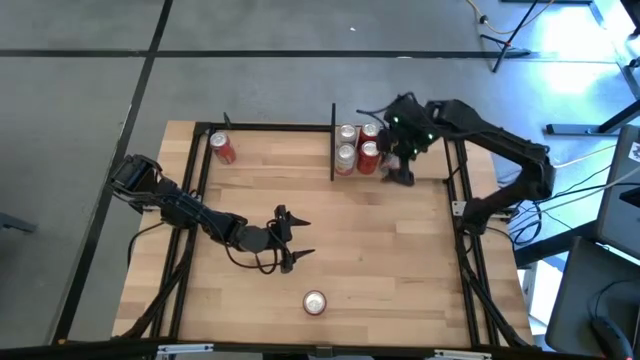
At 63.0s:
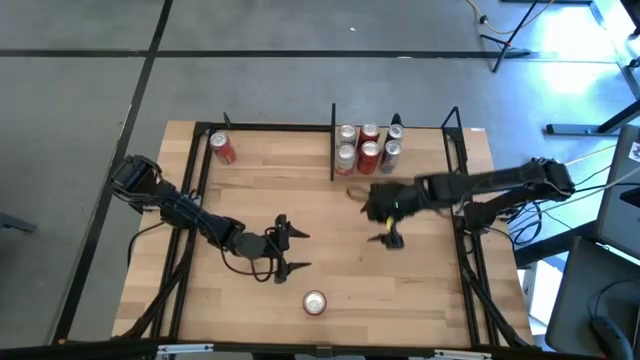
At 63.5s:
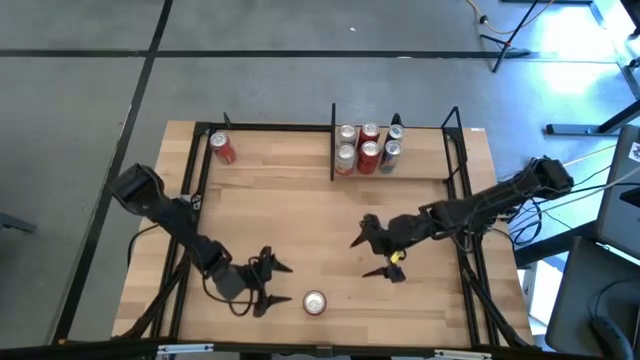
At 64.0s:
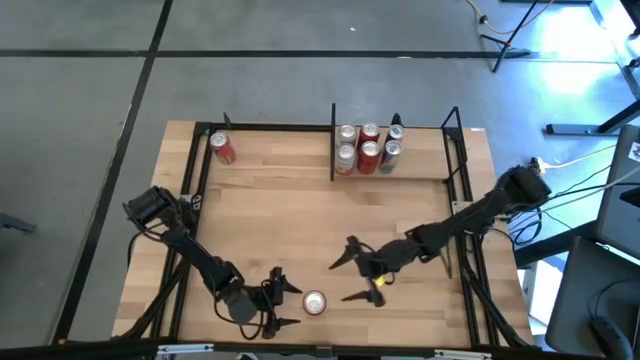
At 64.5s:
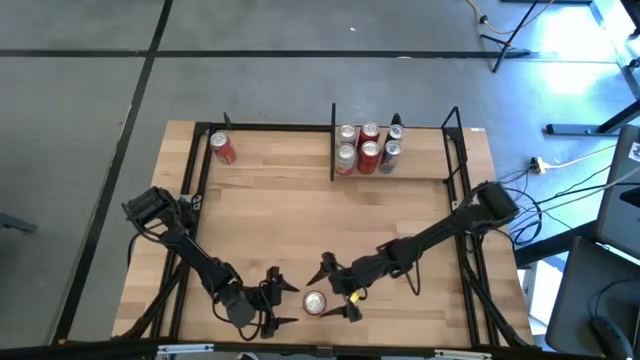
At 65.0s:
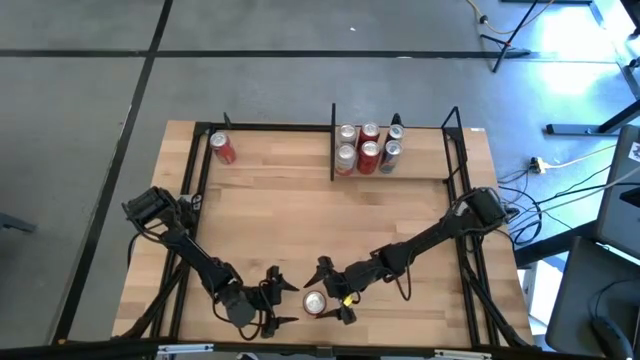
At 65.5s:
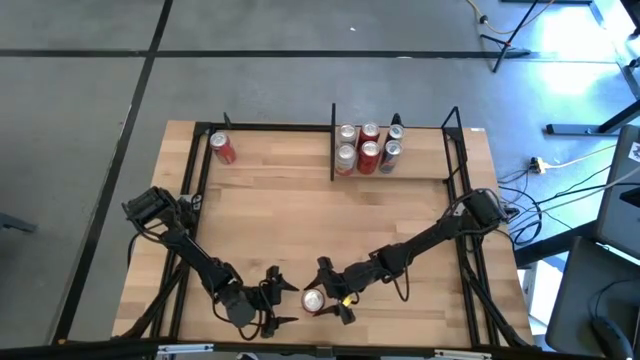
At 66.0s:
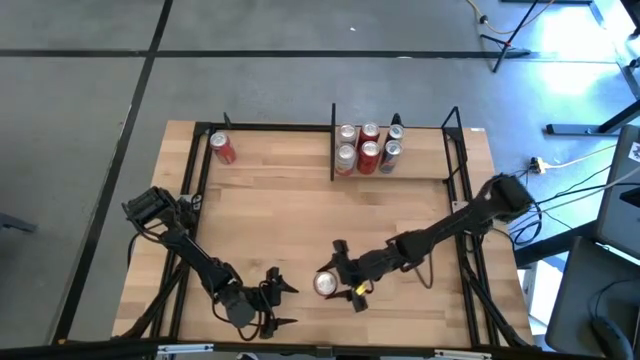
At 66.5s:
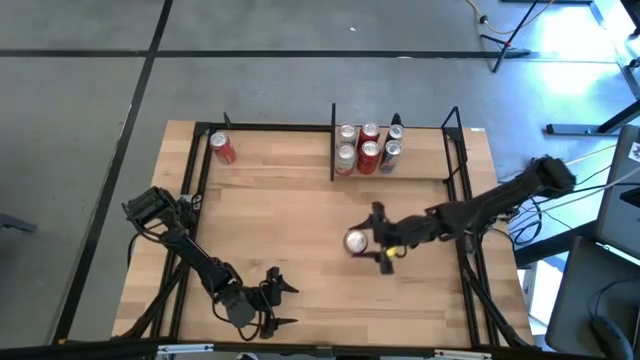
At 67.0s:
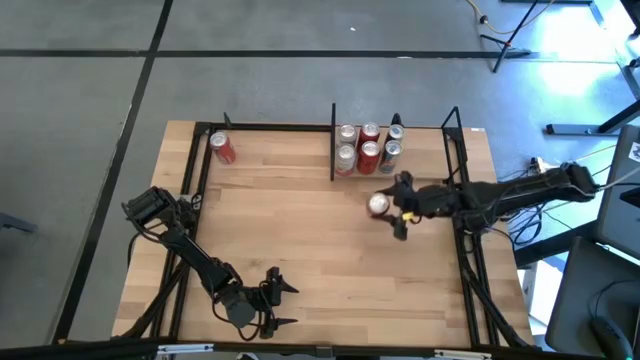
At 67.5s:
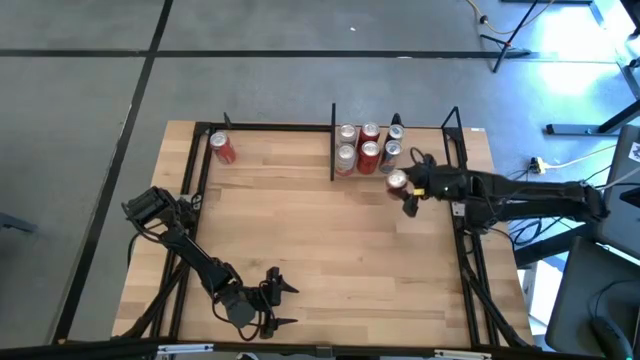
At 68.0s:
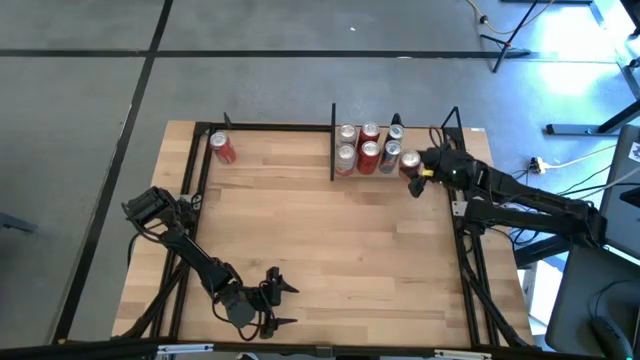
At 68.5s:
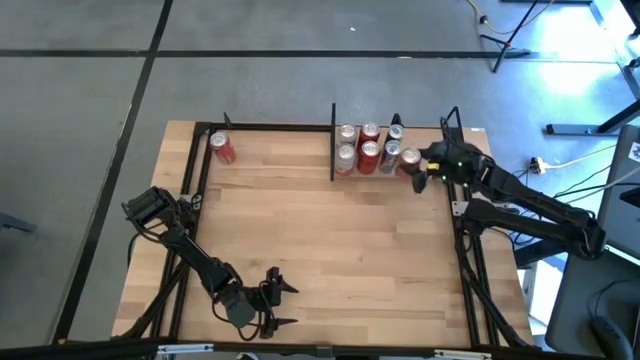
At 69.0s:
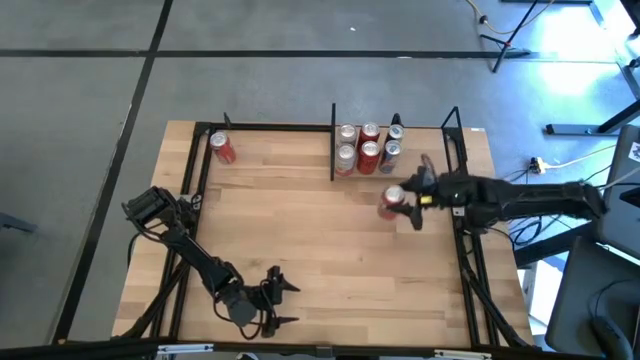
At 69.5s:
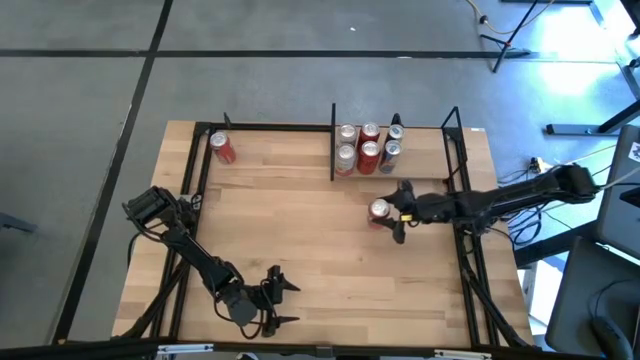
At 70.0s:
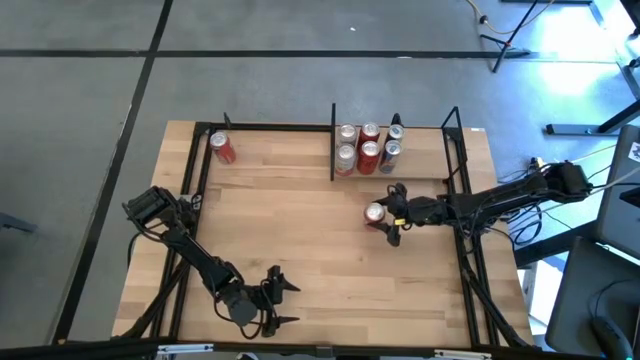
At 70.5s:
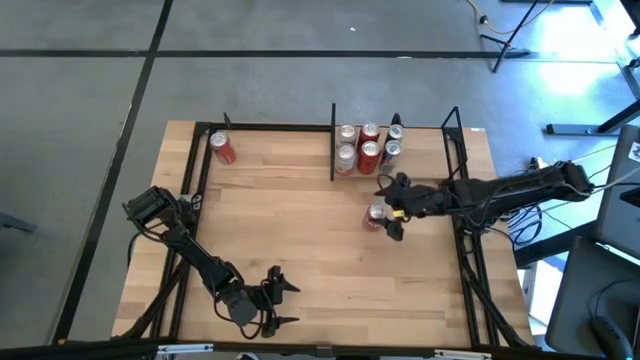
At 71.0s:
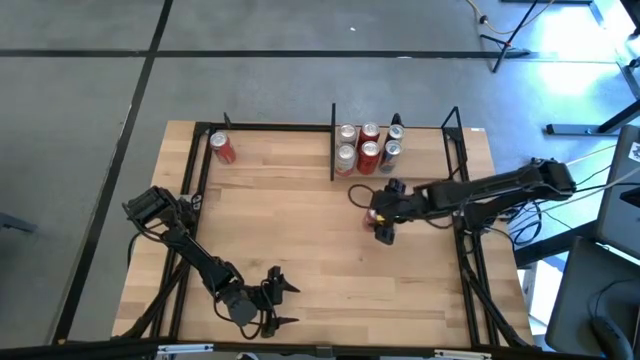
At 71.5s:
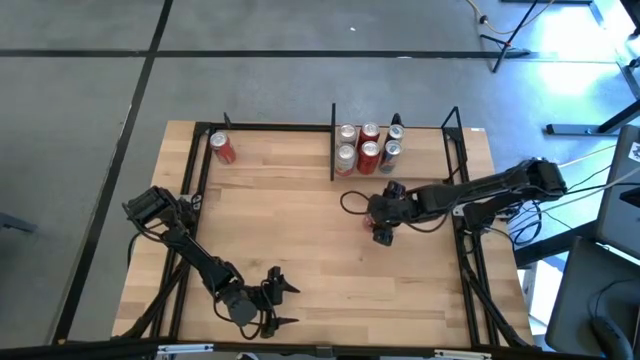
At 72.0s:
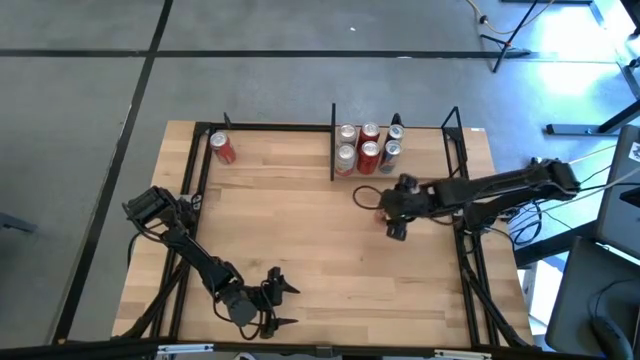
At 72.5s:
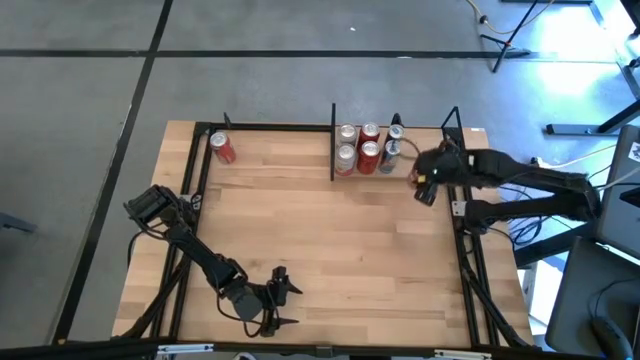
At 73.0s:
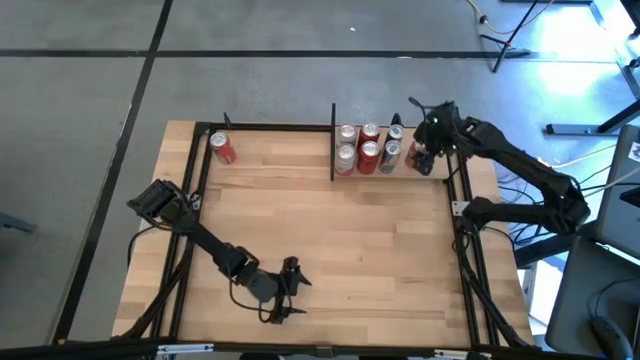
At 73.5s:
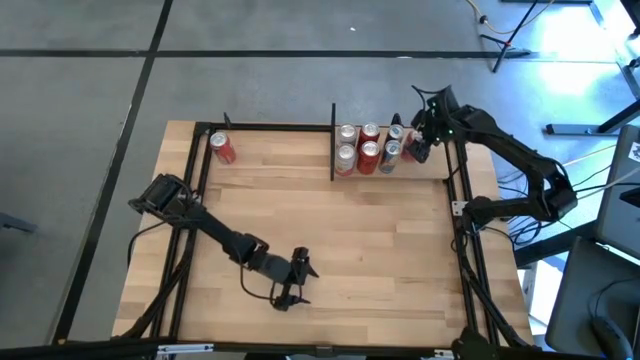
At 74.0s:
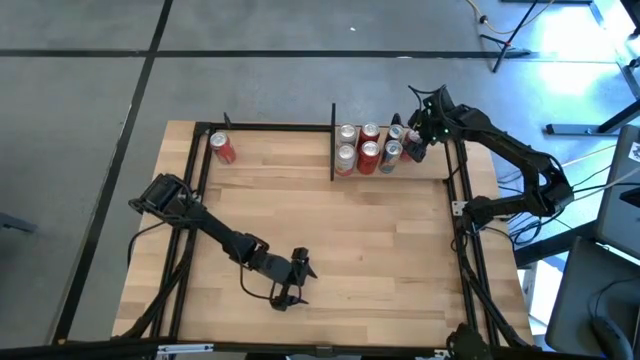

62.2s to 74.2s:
Task: Place canned beverage on shelf
Put the bottom red soda can on the shelf

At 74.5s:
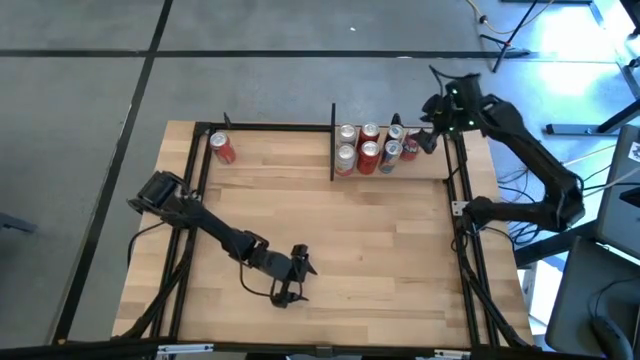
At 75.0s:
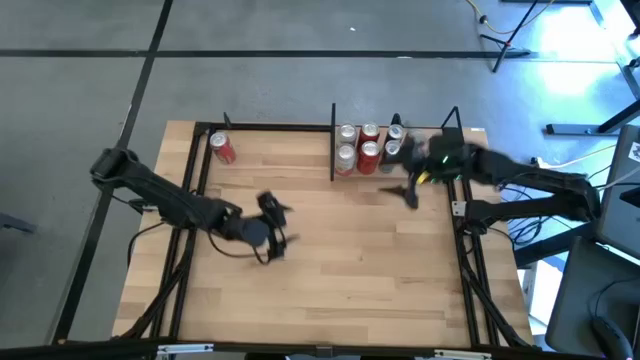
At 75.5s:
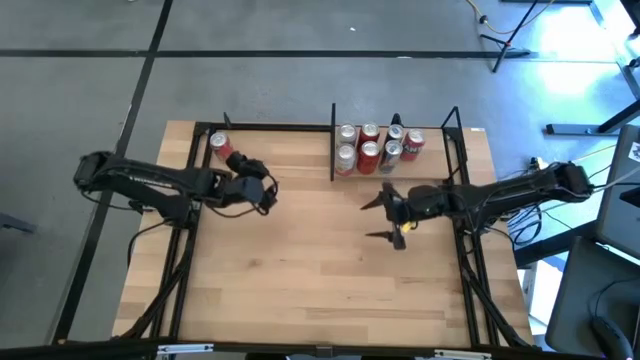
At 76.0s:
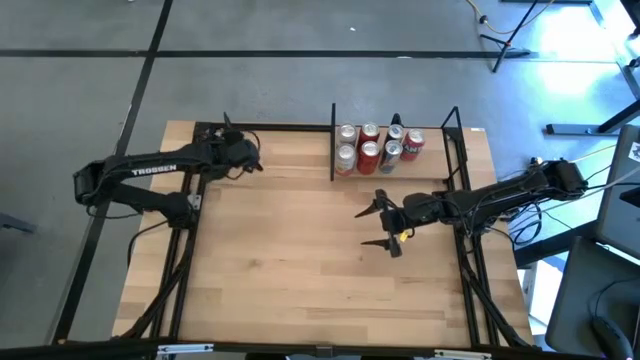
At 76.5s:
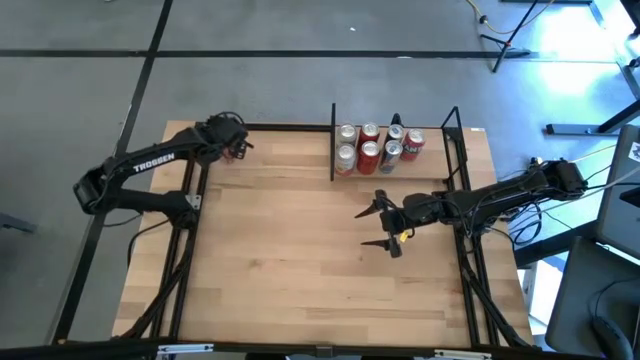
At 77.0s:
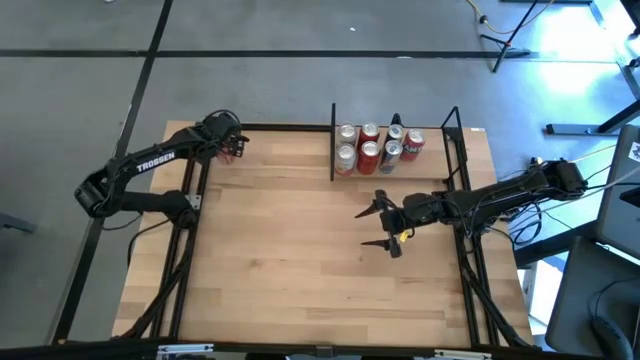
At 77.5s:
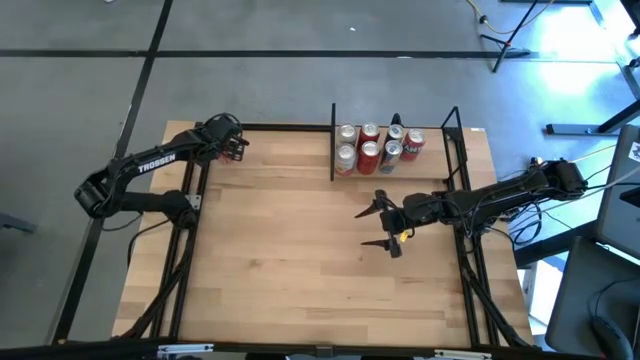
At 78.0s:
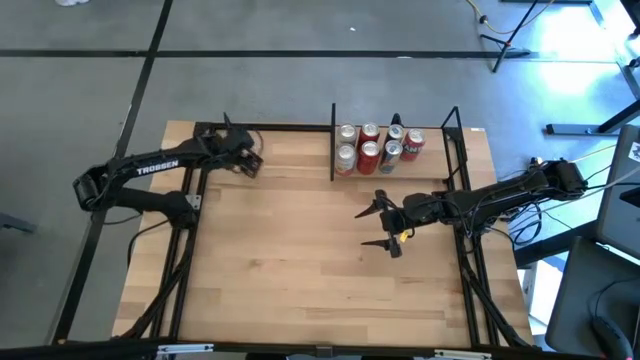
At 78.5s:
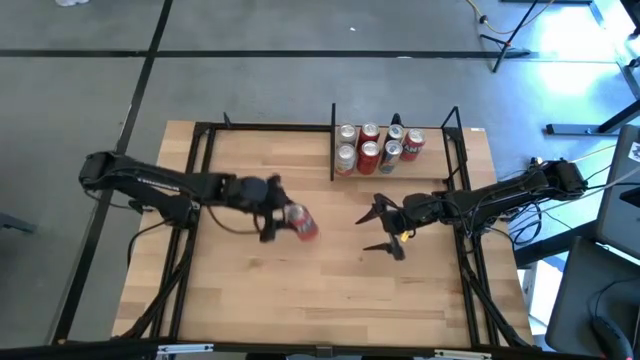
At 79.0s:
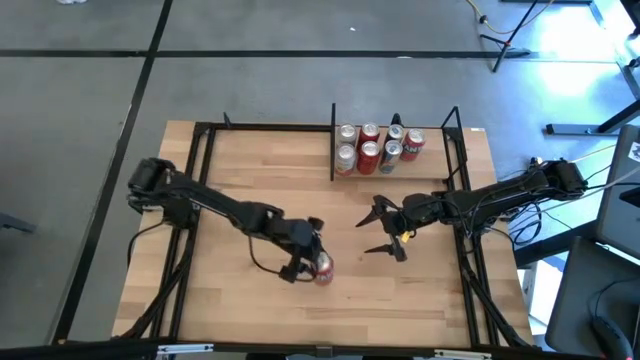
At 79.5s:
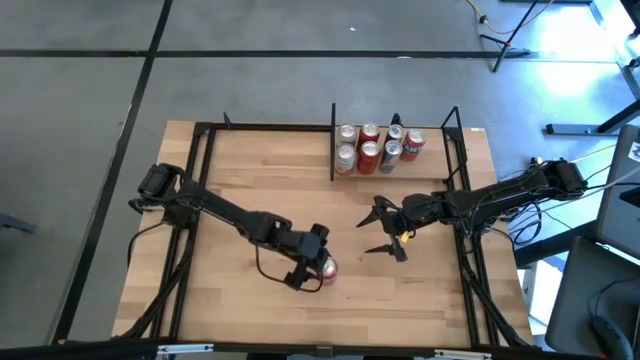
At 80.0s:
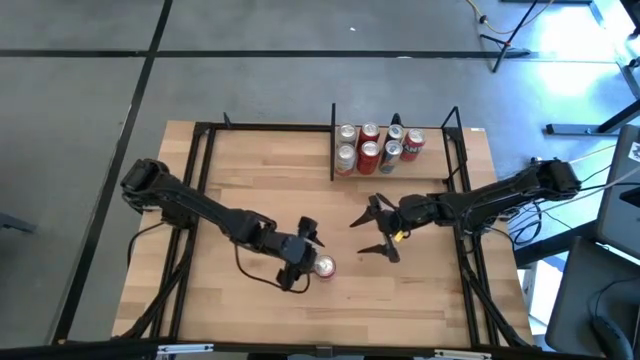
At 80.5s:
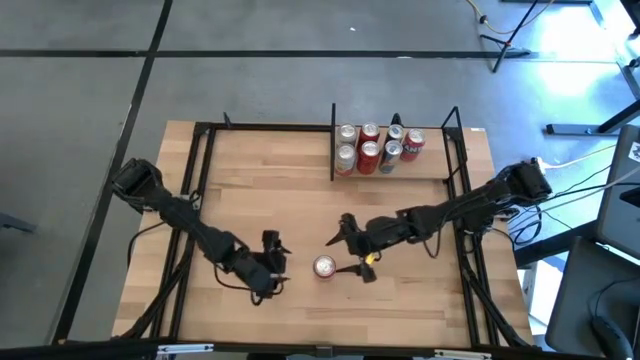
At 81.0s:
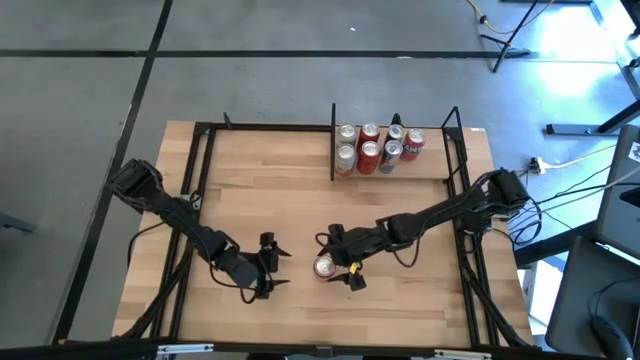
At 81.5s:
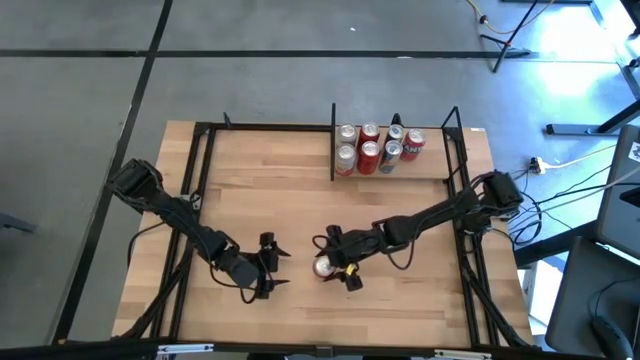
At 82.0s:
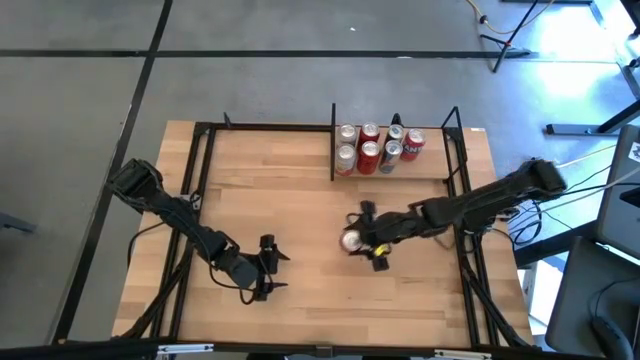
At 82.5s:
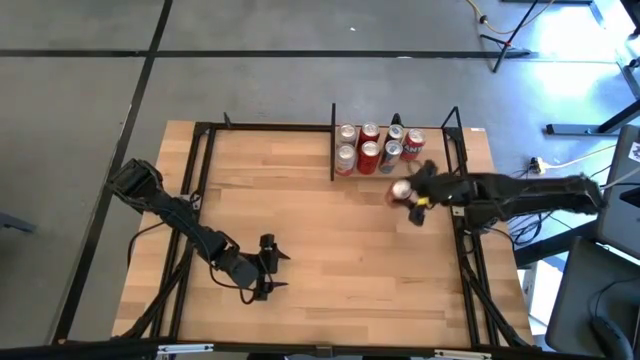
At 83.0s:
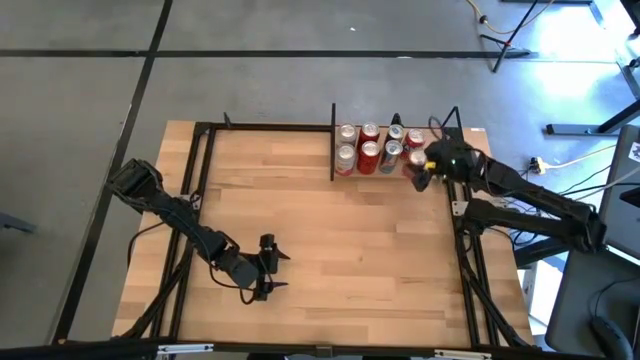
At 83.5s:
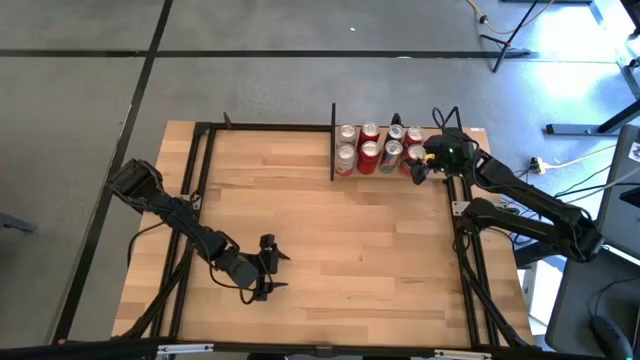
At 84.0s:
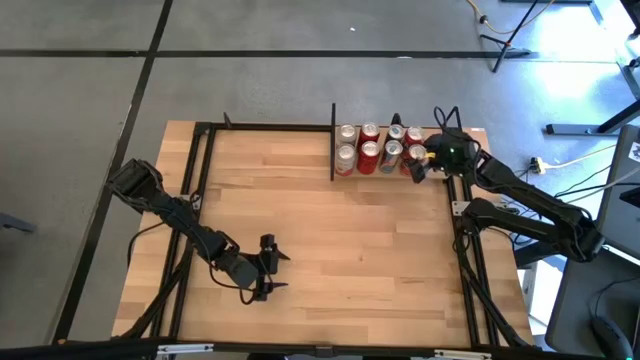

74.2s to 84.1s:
Put the red soda can on the shelf aligned with the other red soda can
